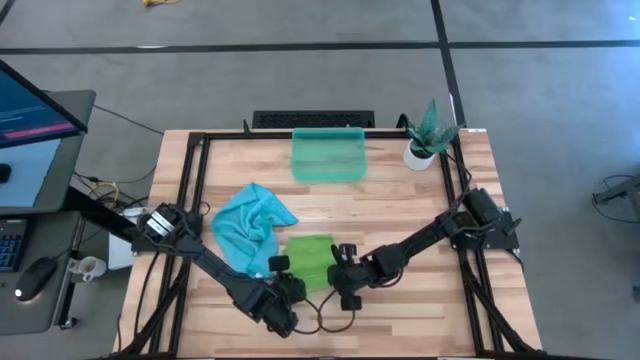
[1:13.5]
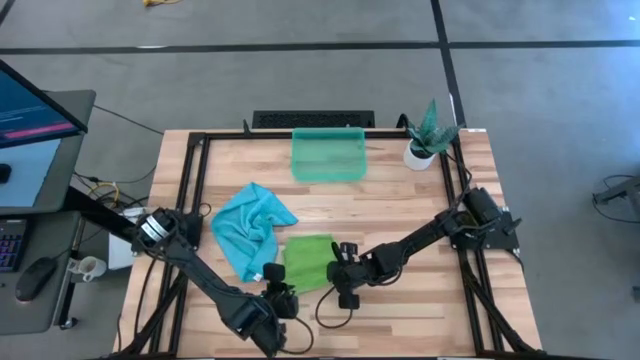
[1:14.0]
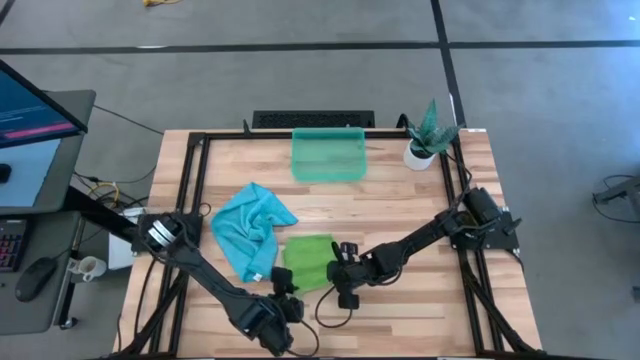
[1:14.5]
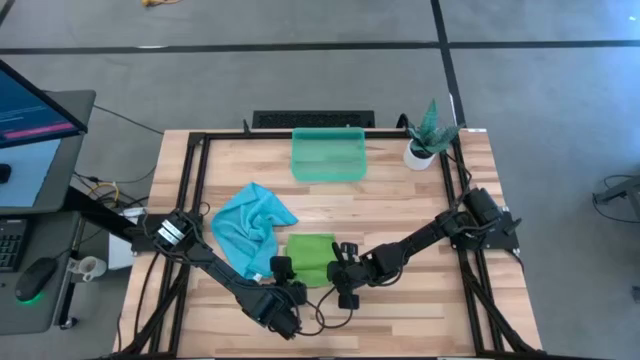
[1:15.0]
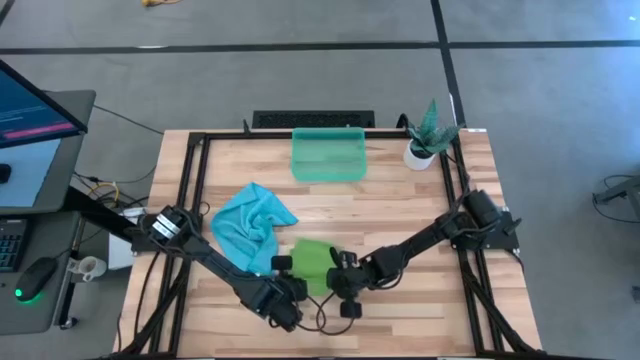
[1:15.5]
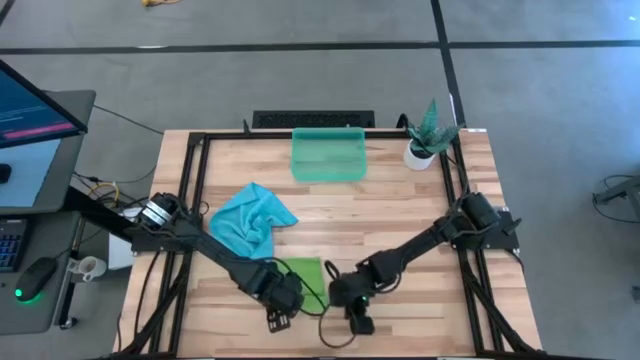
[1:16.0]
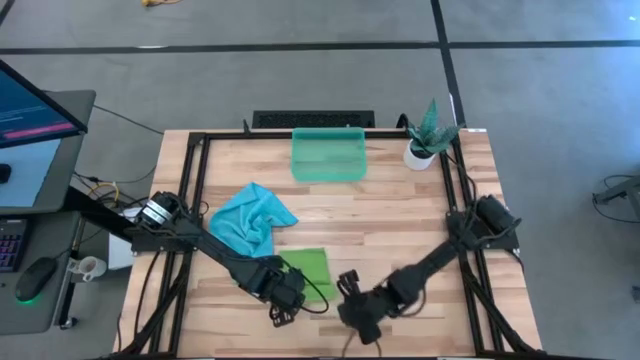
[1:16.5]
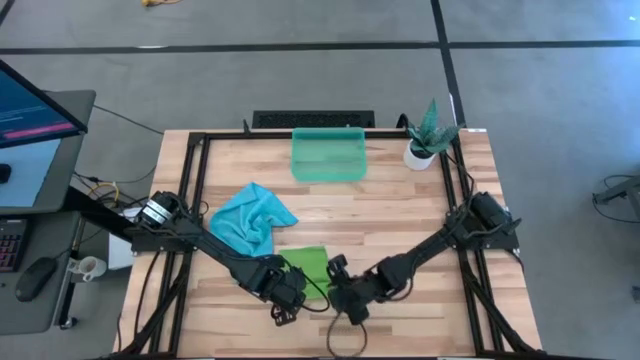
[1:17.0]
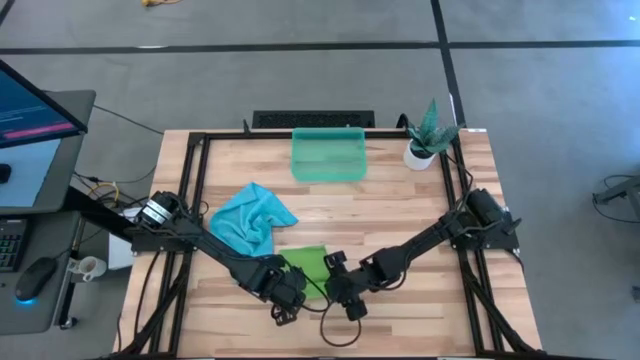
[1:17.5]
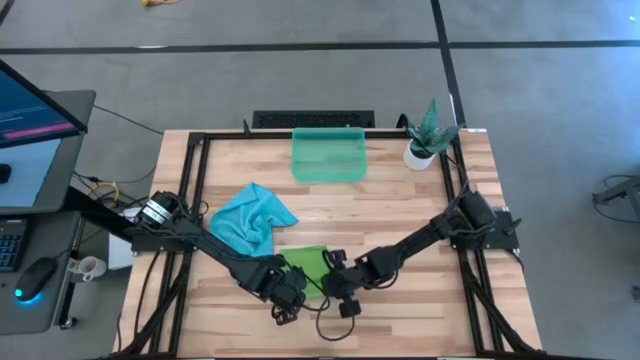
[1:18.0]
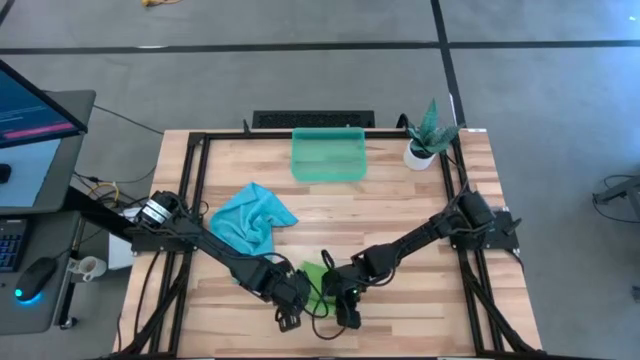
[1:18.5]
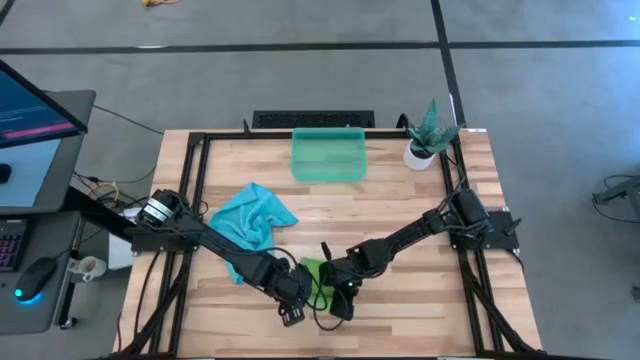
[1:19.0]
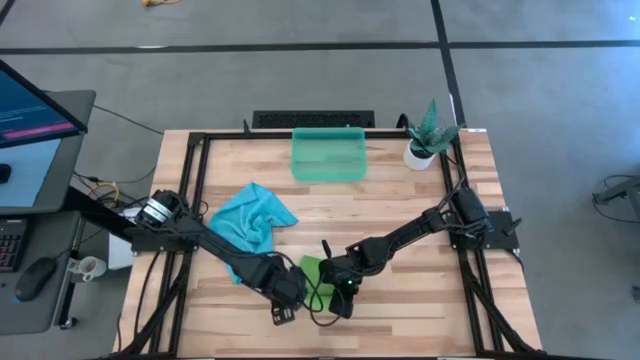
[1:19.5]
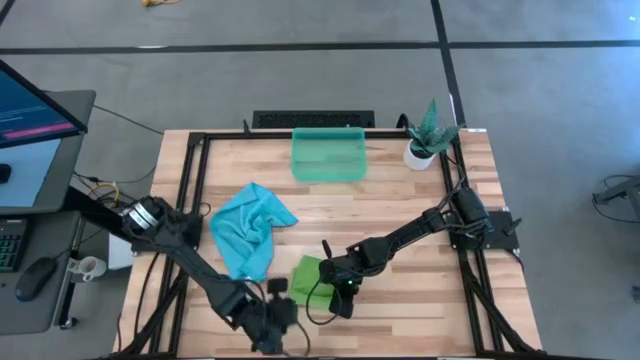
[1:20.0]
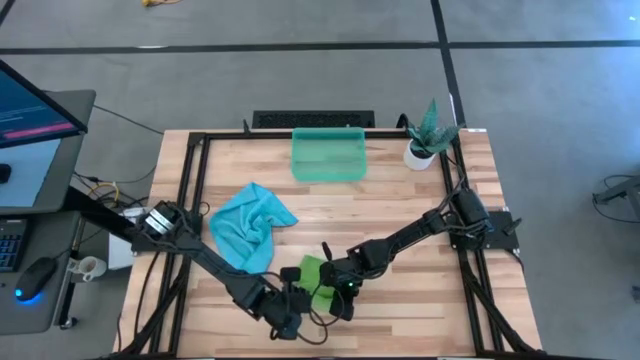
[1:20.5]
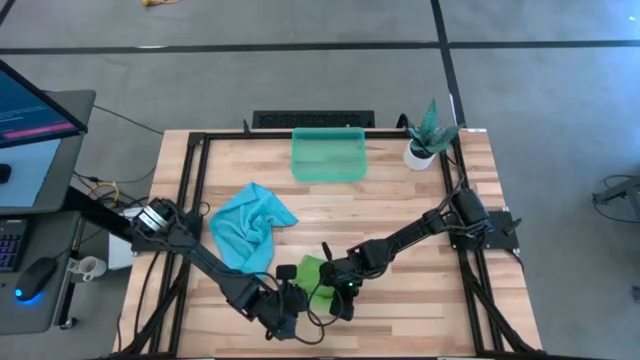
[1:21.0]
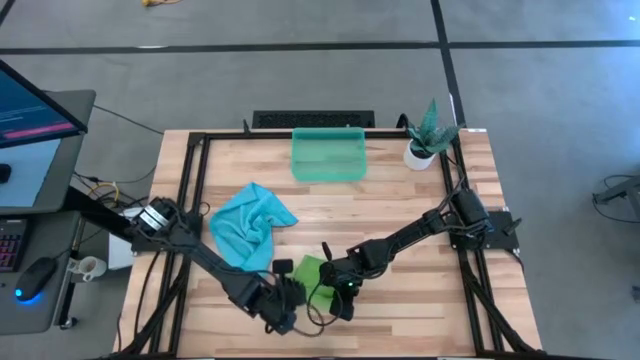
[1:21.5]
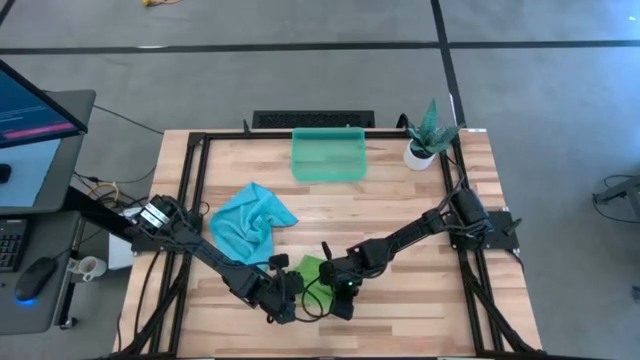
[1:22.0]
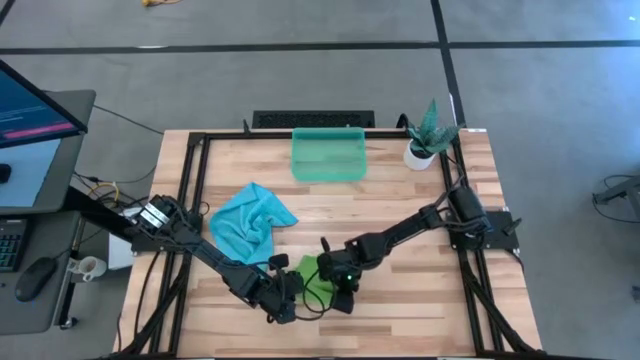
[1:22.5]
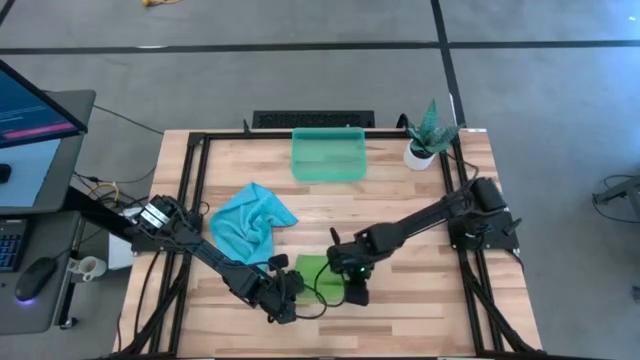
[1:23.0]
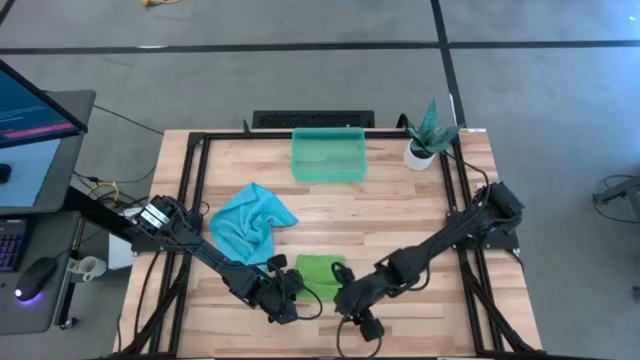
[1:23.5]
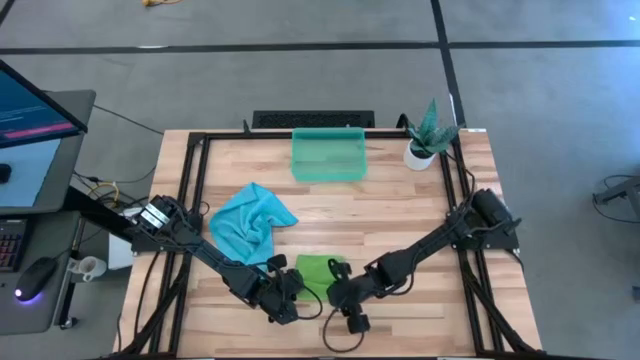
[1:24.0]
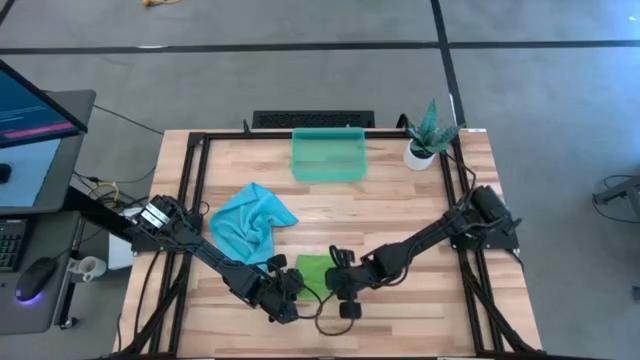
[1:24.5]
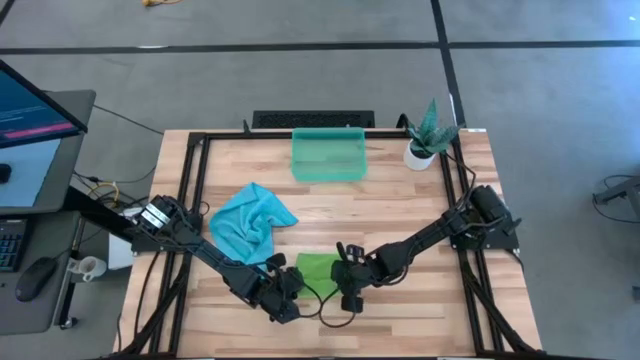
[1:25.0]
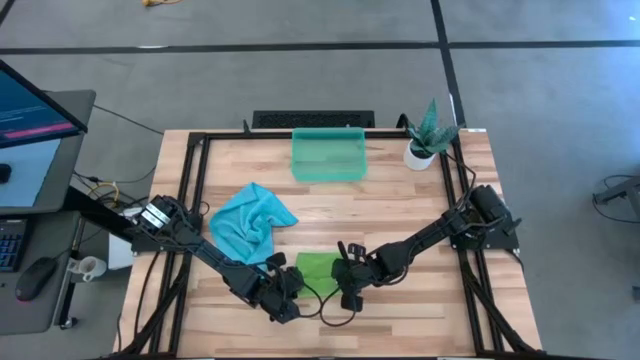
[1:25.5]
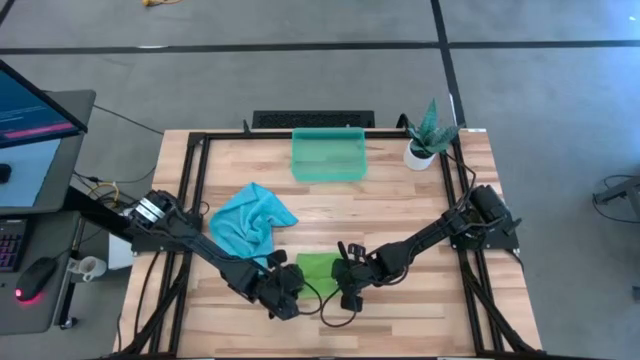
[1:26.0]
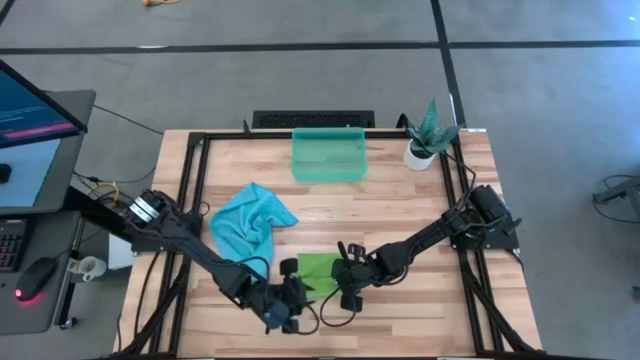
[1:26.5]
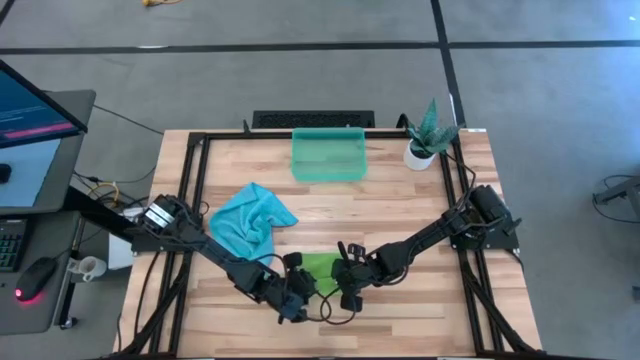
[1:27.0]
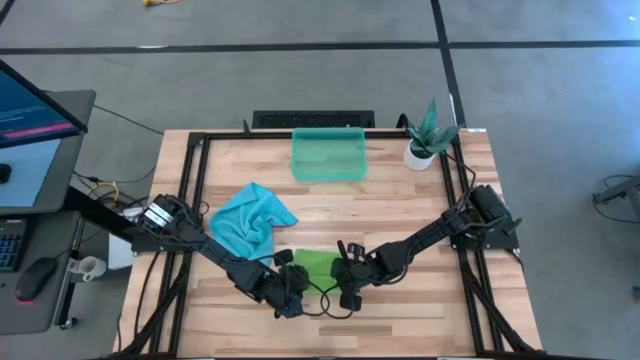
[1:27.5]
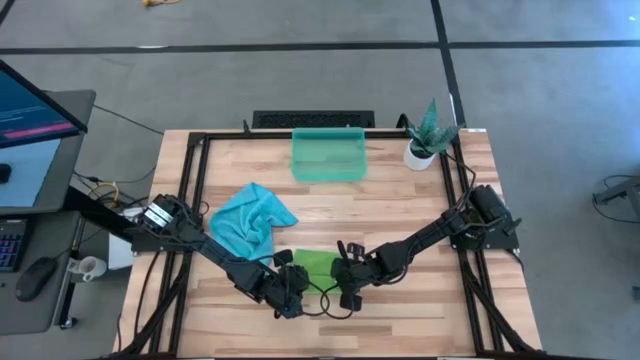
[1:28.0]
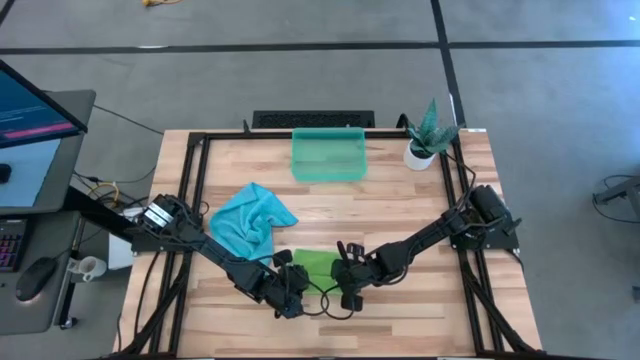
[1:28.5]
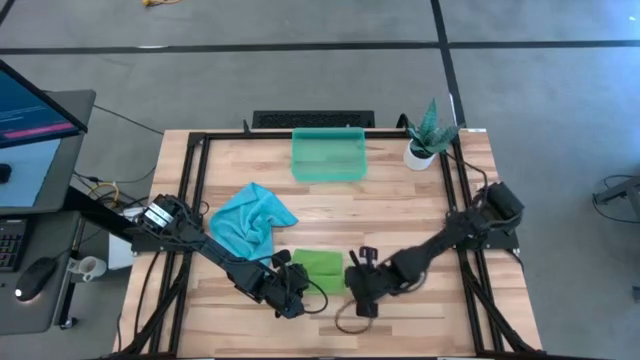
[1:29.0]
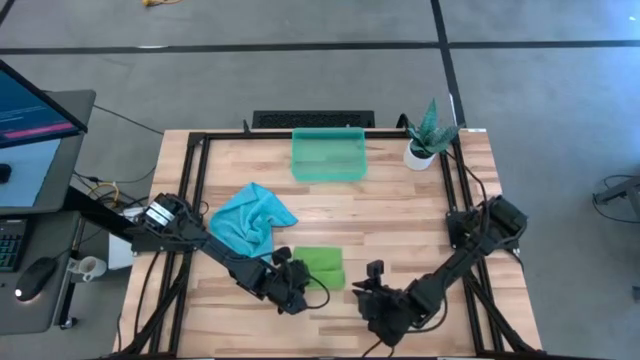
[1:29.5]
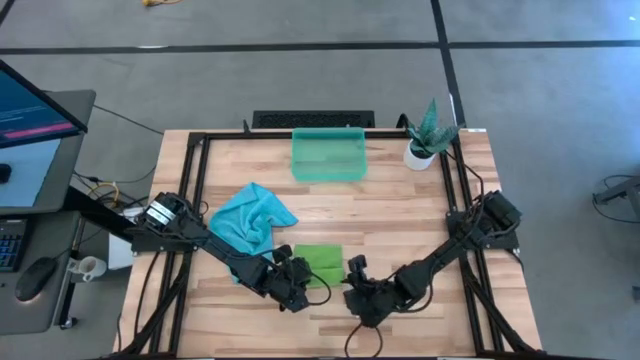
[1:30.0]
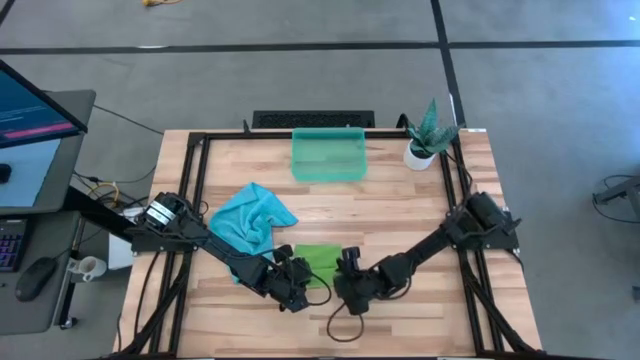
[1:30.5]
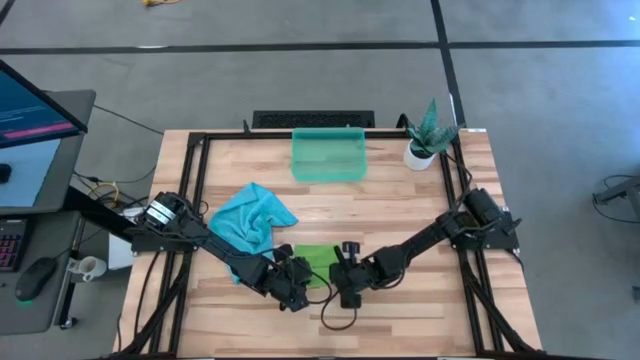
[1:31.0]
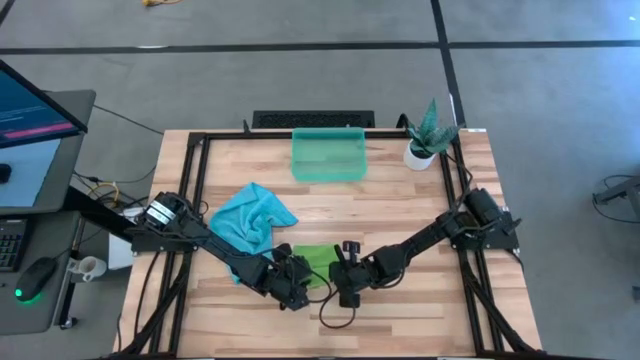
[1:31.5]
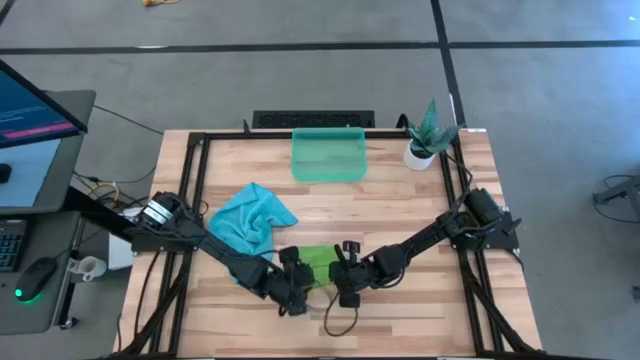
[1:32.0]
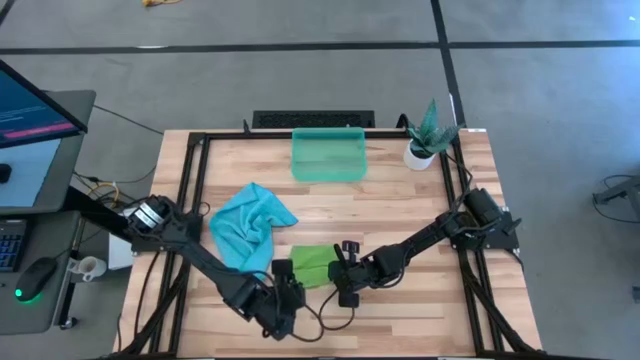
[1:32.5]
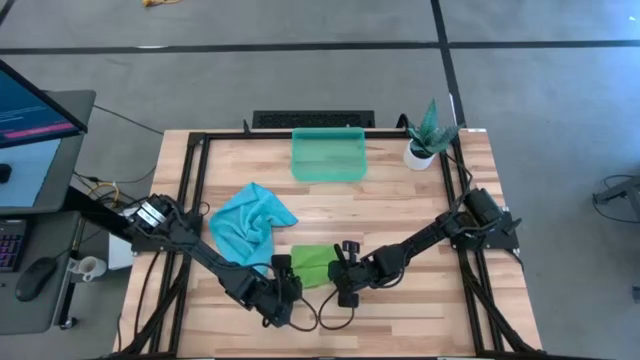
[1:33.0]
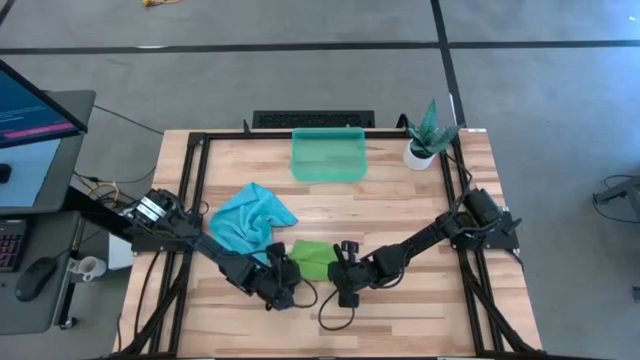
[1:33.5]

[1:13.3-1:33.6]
Task: Roll microfiber towels into tight, uniform cylinder then place into a basket
Roll the green microfiber cloth

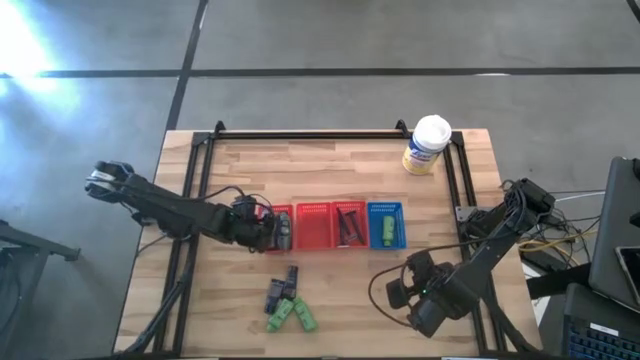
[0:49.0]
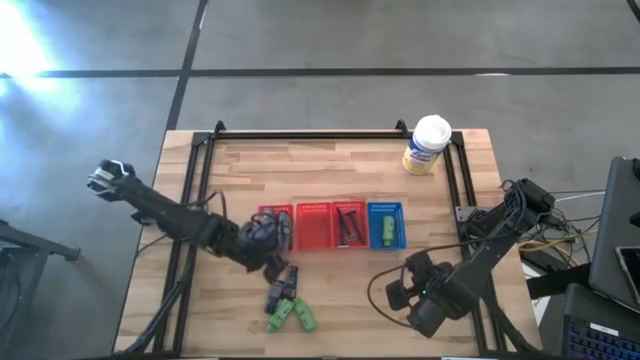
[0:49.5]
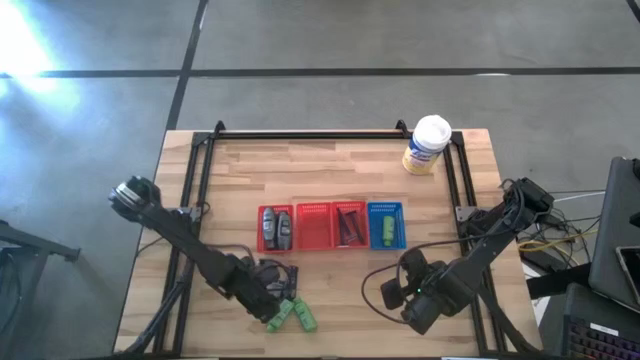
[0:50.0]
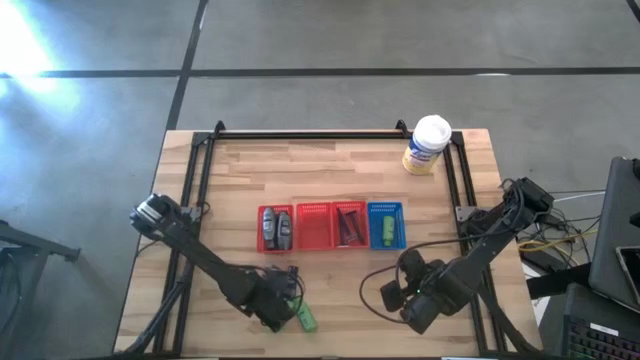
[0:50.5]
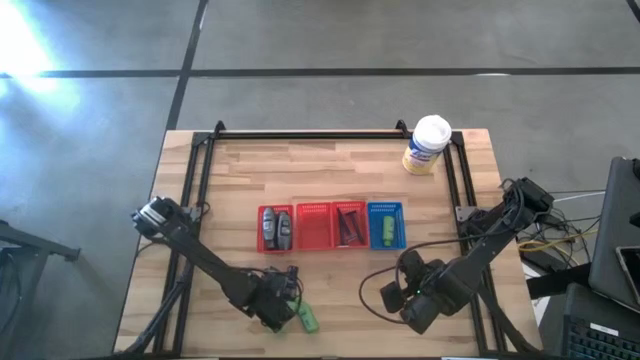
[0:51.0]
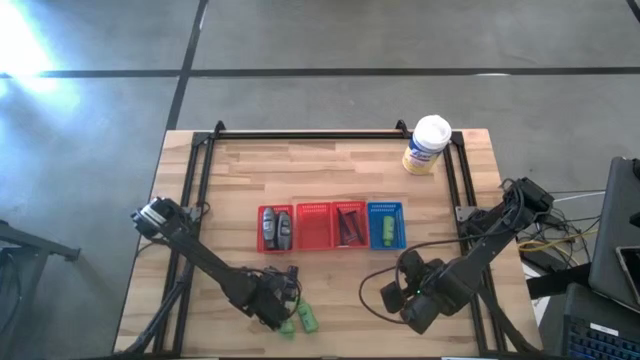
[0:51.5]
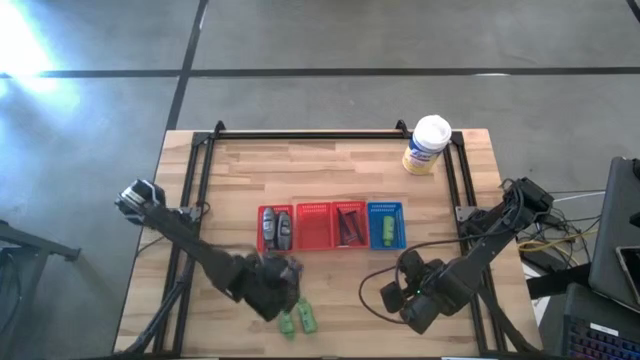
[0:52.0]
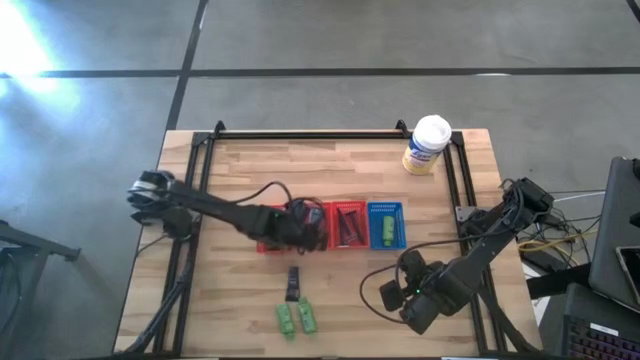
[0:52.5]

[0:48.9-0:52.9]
Task: Pick & Place Travel size toiletries
Put the blue shave cream into the middle red bin
